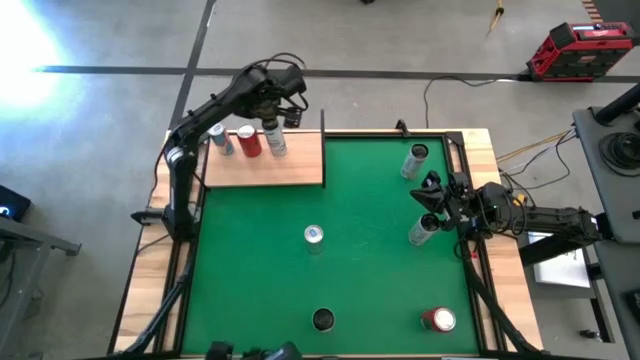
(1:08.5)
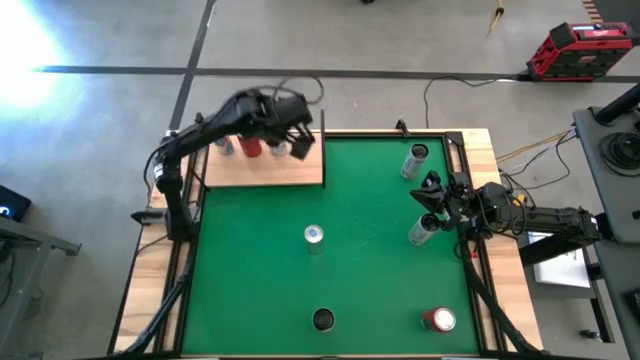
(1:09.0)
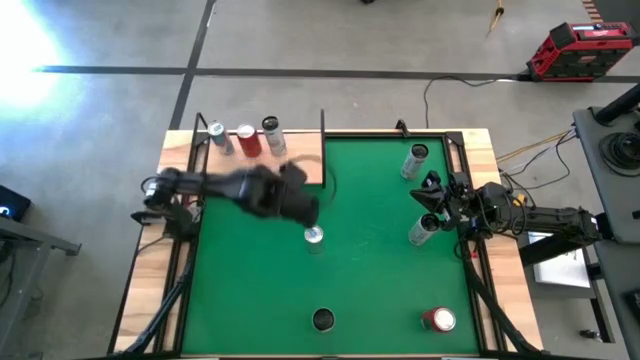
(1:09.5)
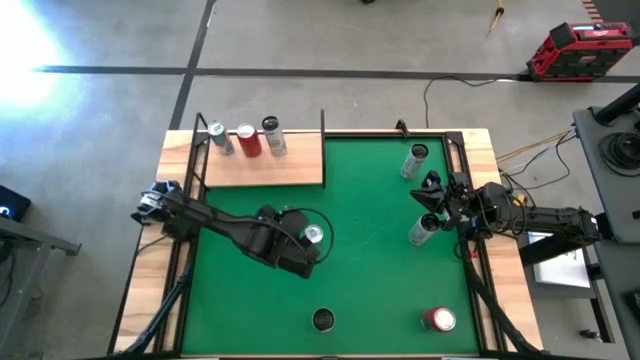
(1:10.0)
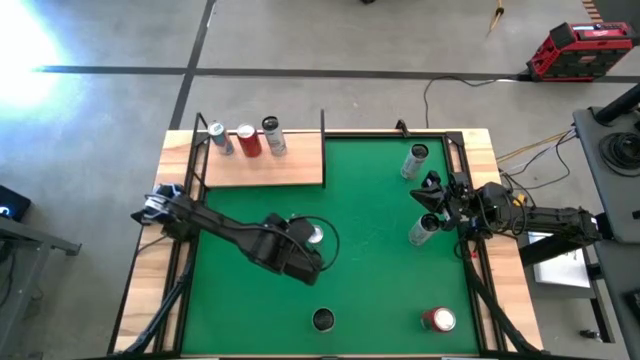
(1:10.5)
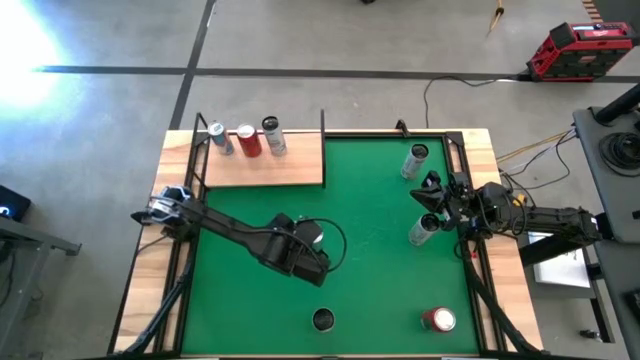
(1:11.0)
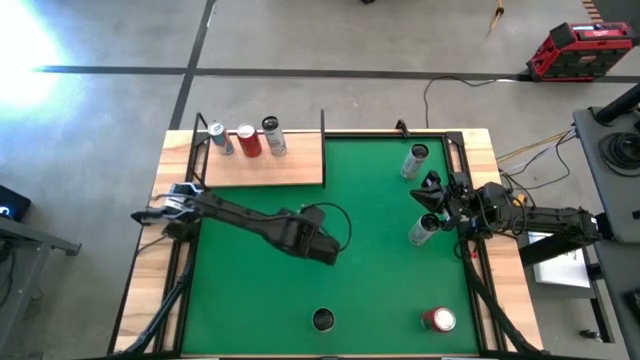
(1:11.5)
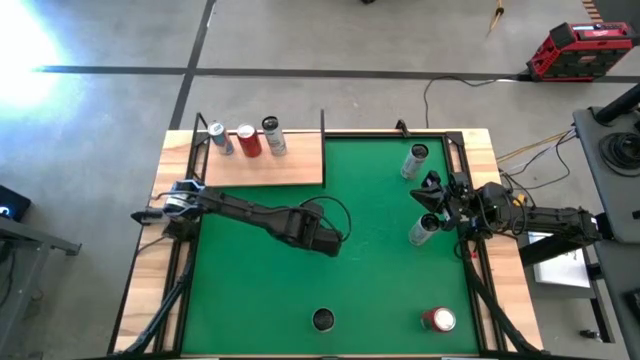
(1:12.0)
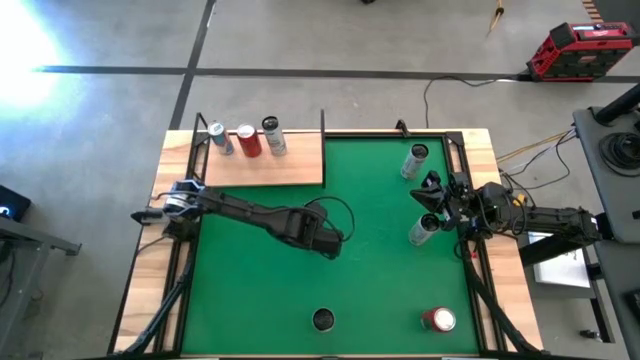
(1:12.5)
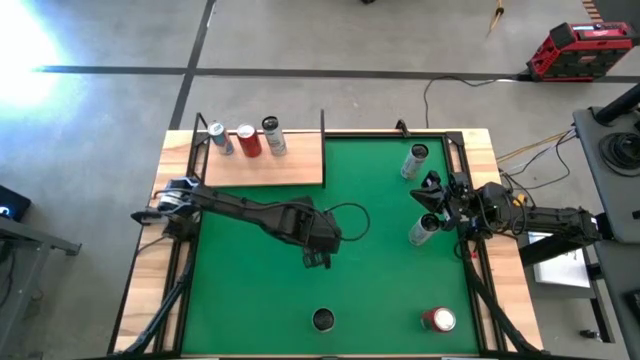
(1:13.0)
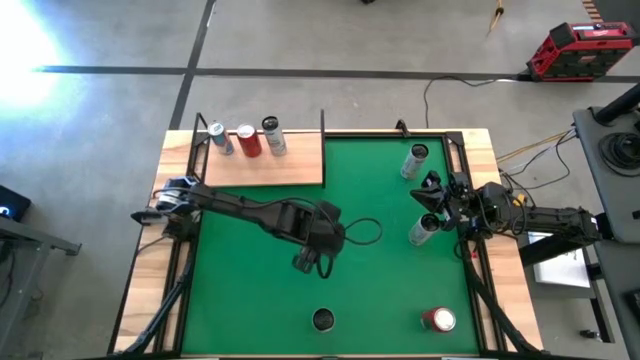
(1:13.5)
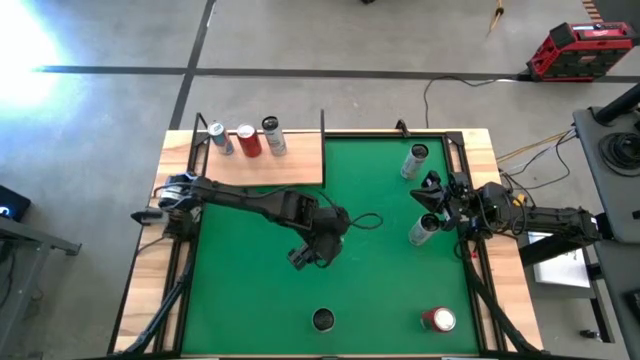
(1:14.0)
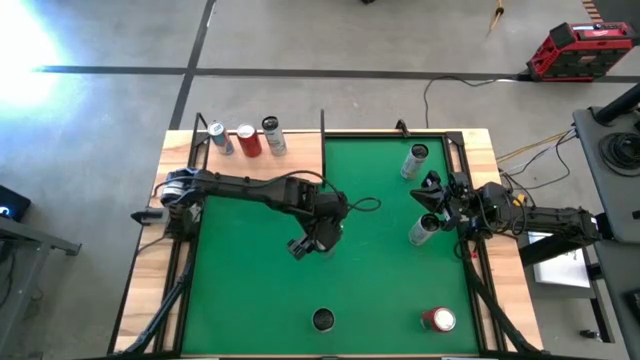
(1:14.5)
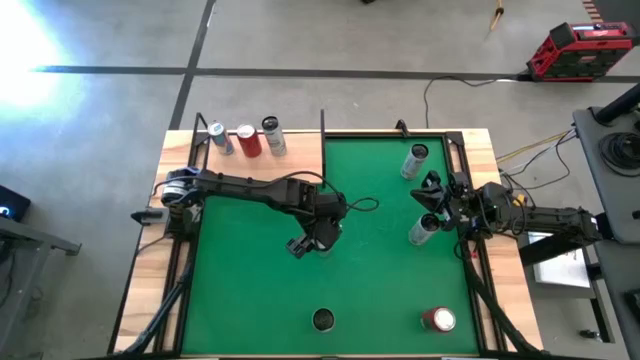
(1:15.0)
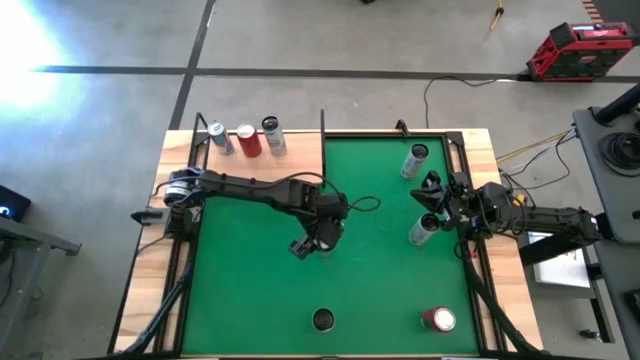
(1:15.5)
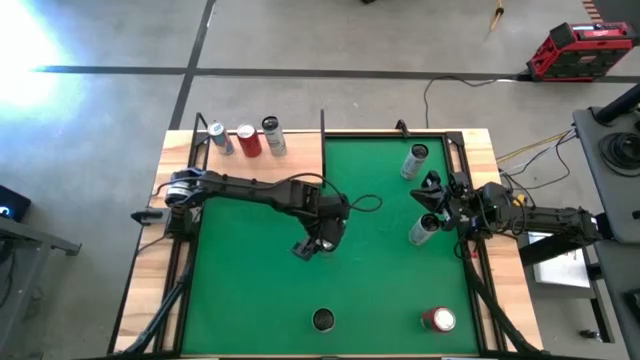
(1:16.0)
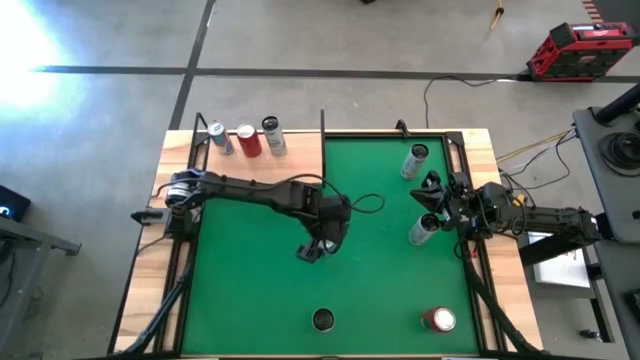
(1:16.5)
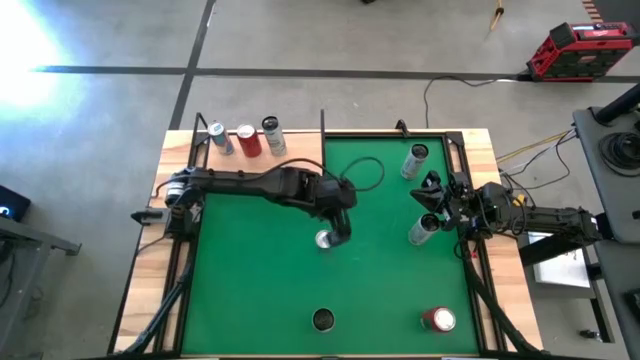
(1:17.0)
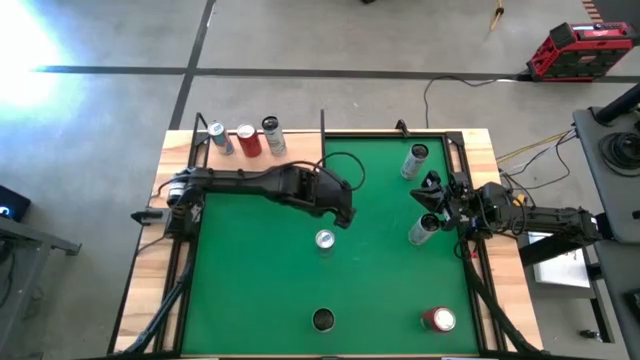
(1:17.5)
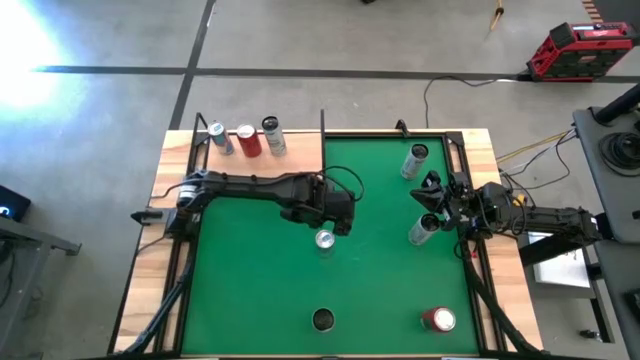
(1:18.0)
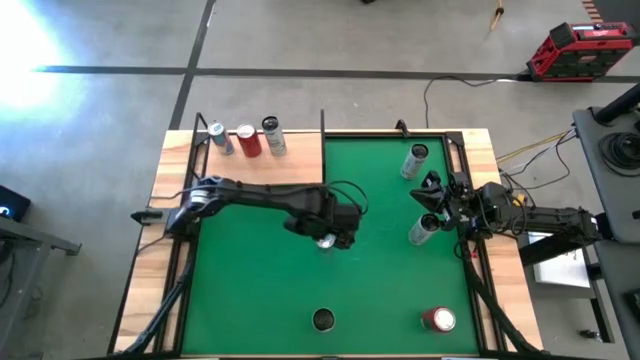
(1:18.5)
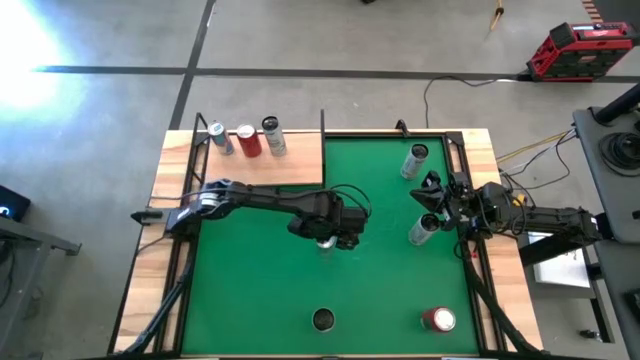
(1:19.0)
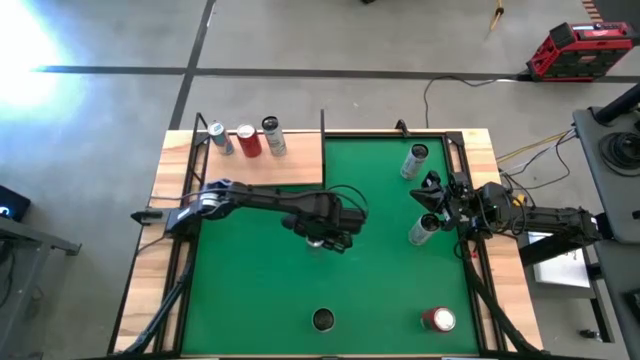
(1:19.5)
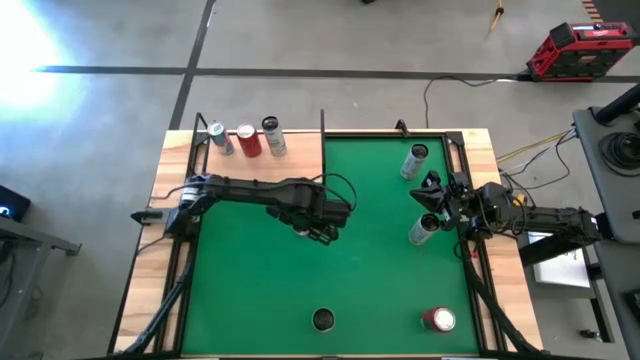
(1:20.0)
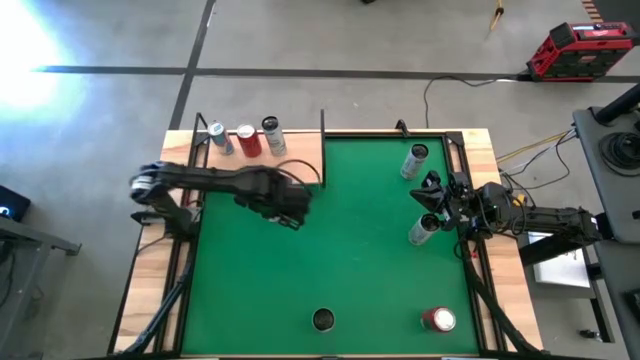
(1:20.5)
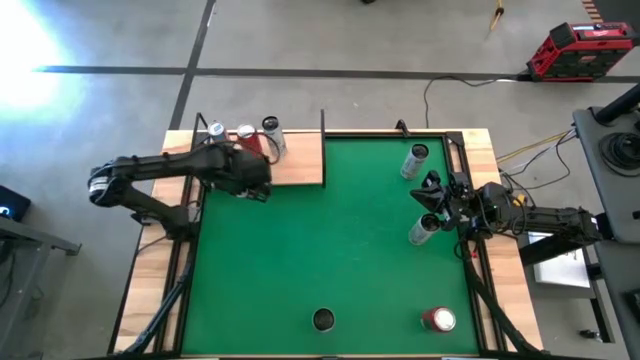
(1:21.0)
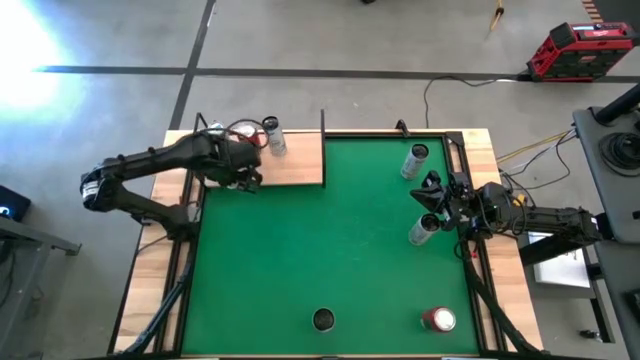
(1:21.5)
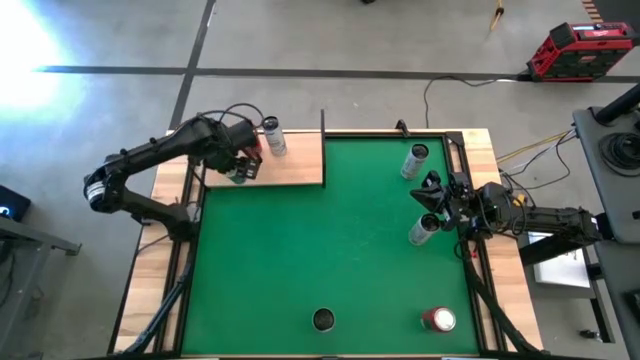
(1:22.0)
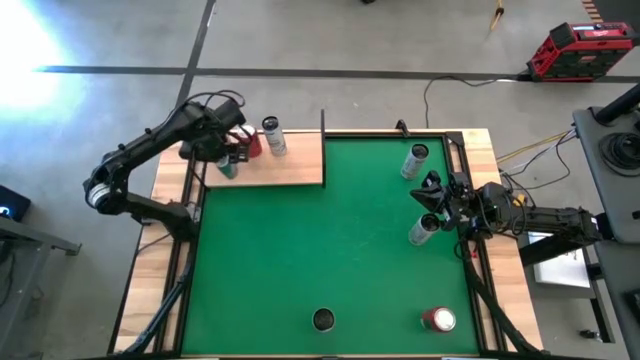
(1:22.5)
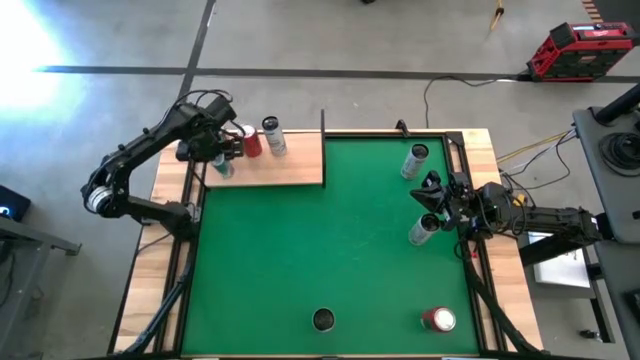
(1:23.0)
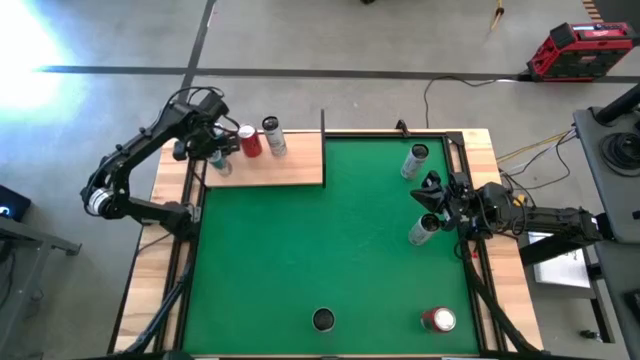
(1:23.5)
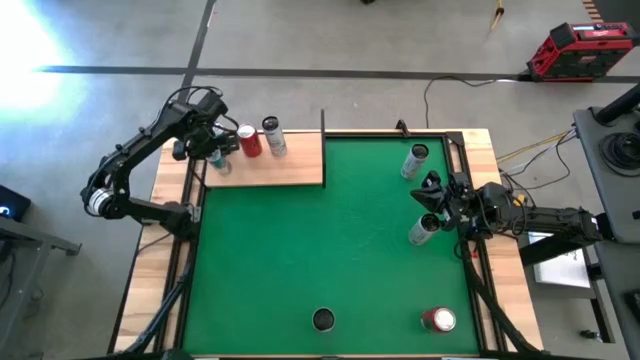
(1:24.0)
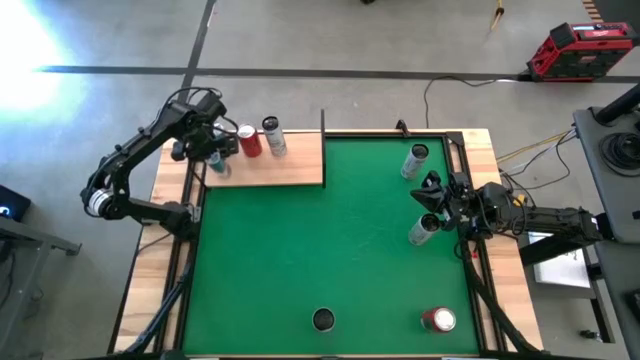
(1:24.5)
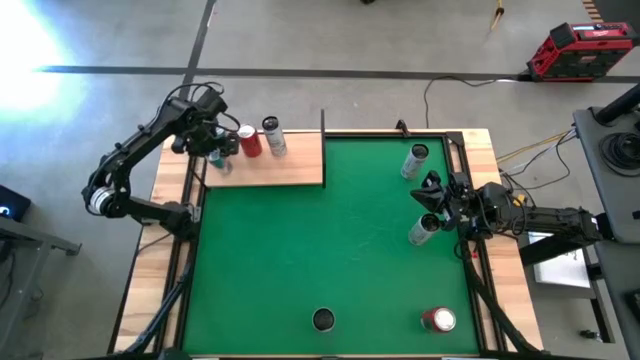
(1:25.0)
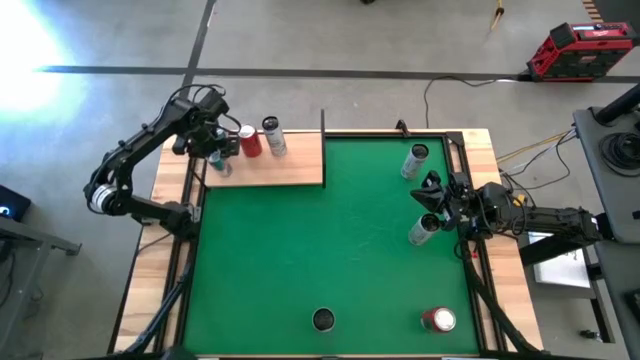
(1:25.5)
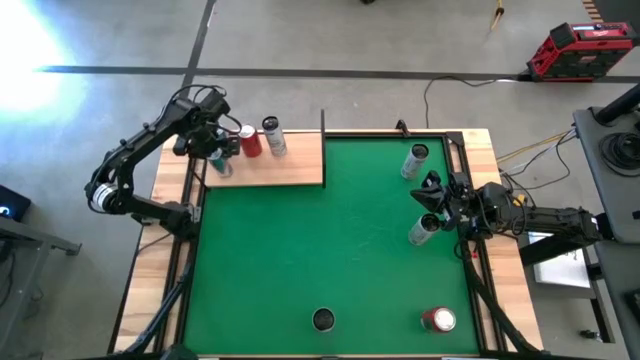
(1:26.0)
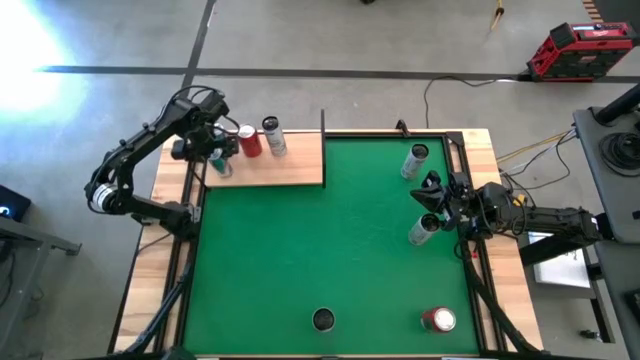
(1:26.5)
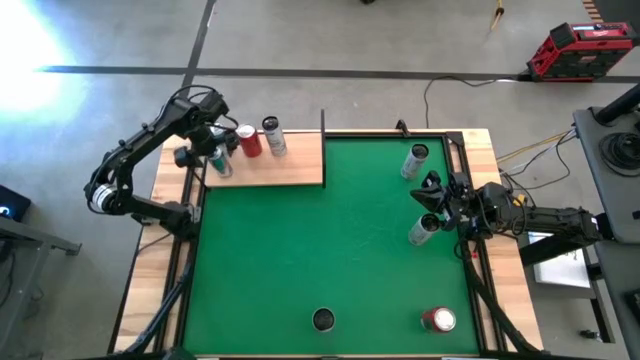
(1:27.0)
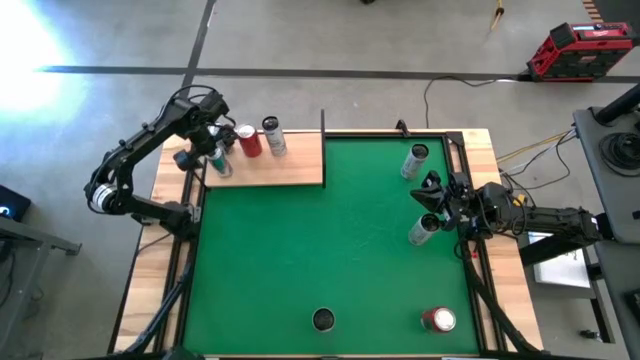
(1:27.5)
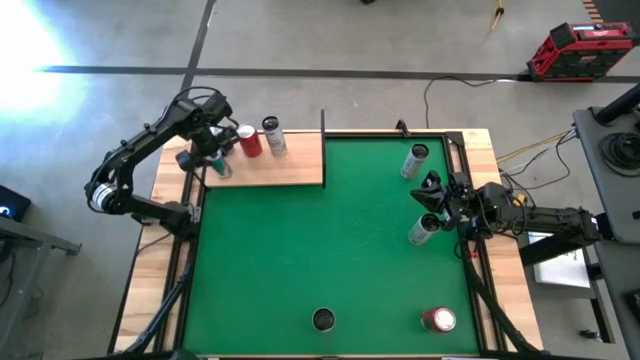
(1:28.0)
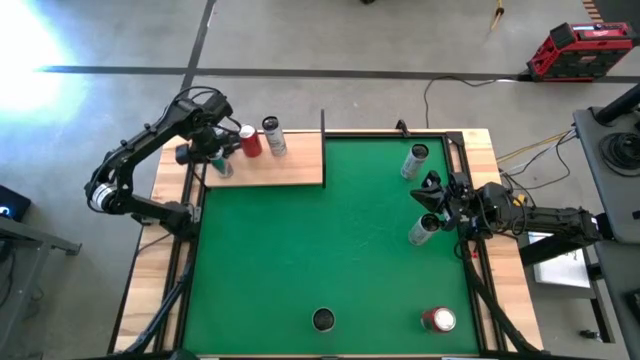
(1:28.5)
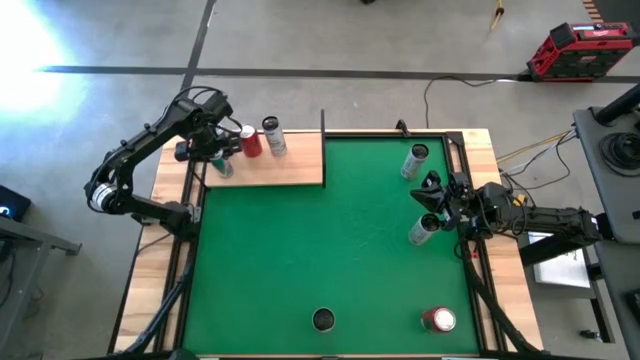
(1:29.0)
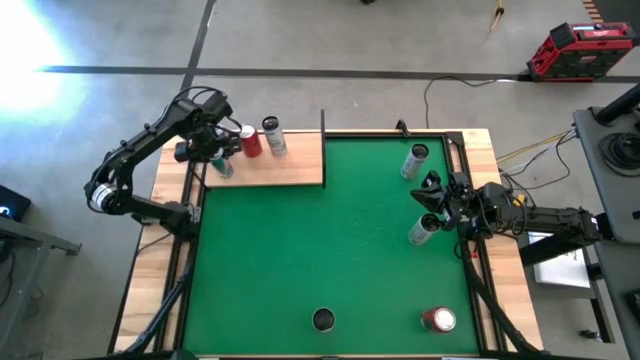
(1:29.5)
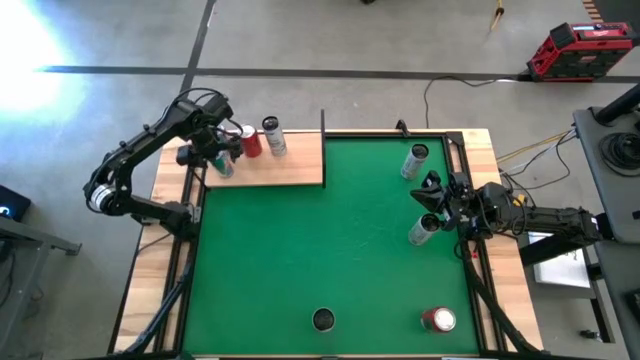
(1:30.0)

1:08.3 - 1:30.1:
Task: Place canned beverage on shelf
Put the blue soda can on the shelf aligned with the other blue soda can
